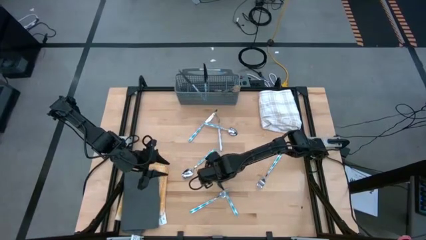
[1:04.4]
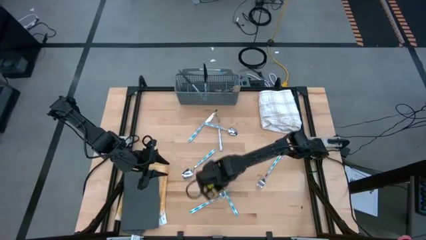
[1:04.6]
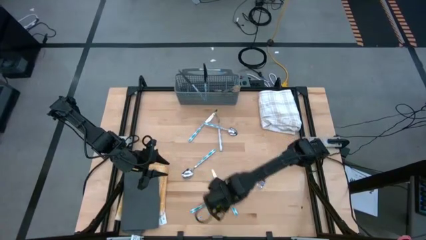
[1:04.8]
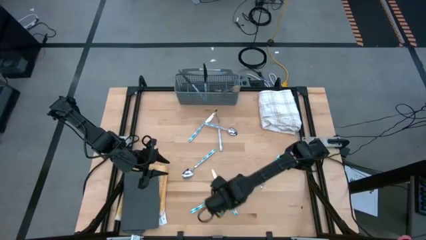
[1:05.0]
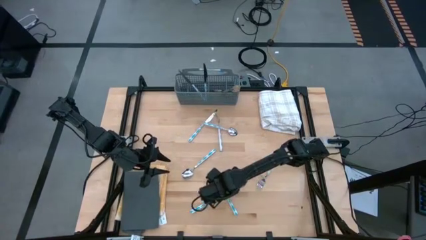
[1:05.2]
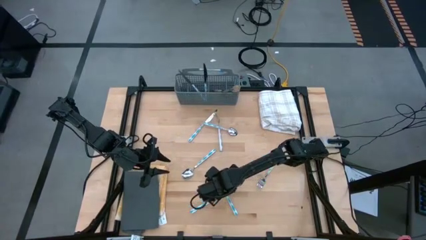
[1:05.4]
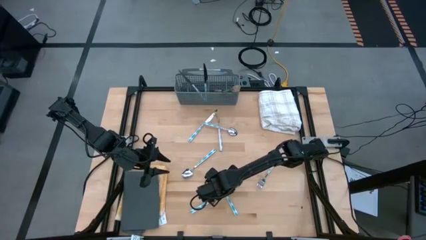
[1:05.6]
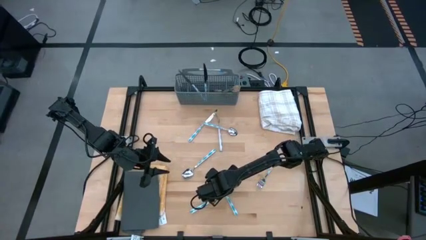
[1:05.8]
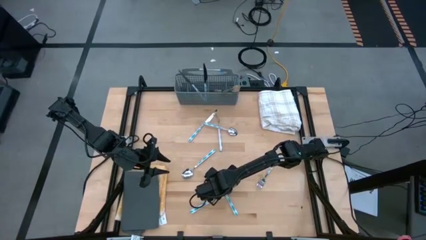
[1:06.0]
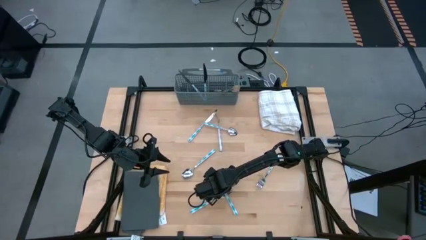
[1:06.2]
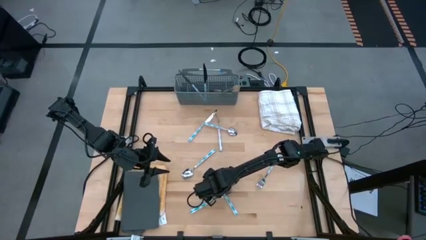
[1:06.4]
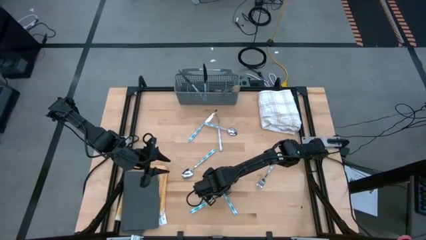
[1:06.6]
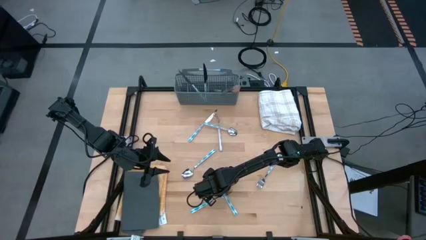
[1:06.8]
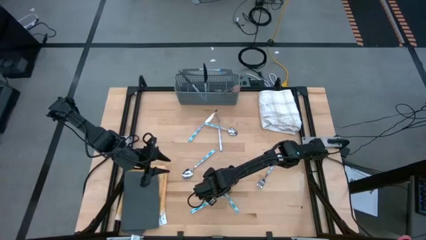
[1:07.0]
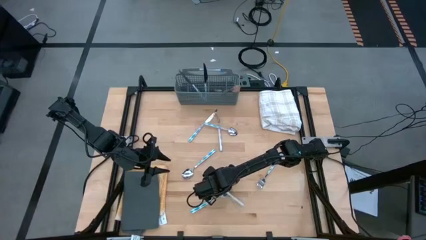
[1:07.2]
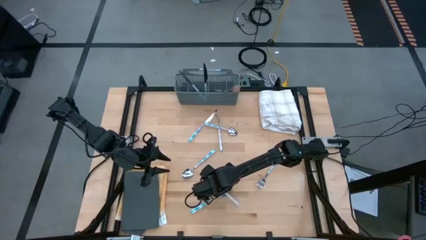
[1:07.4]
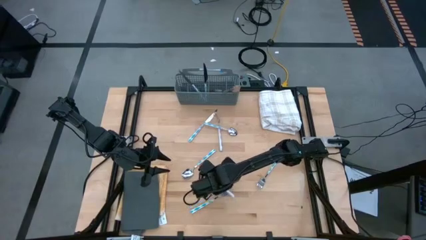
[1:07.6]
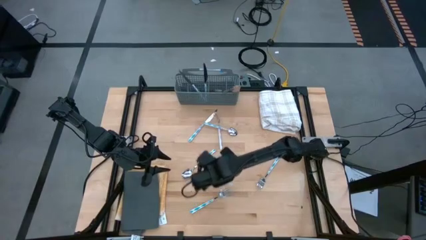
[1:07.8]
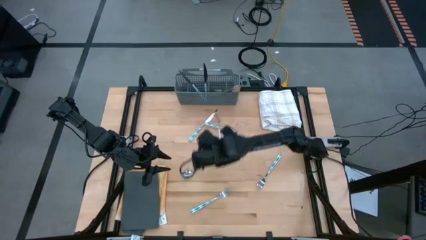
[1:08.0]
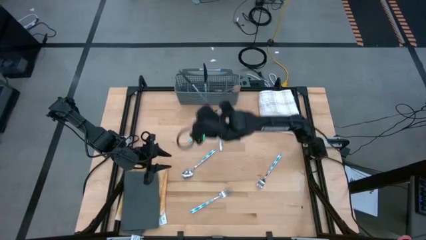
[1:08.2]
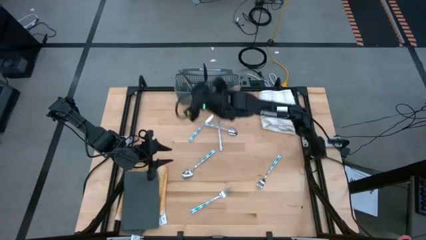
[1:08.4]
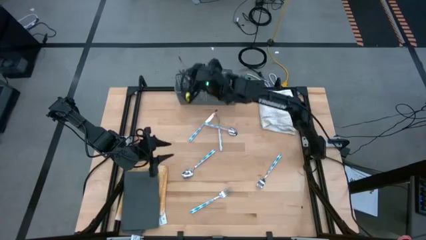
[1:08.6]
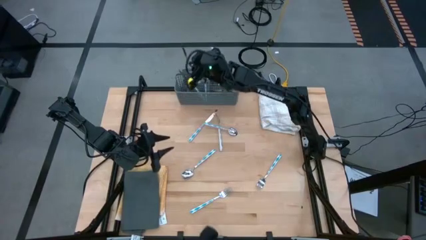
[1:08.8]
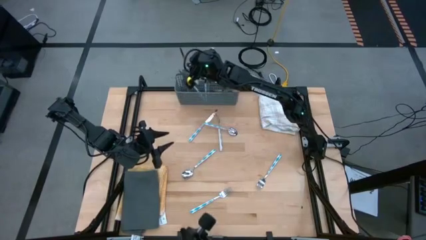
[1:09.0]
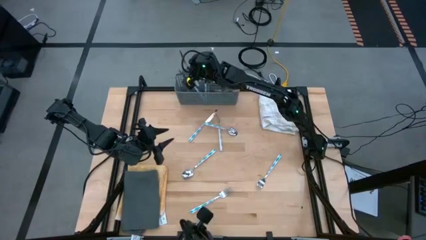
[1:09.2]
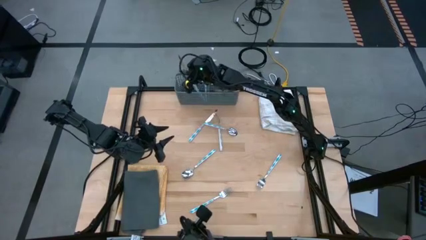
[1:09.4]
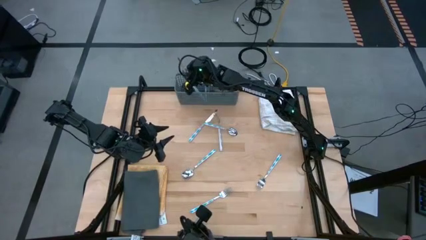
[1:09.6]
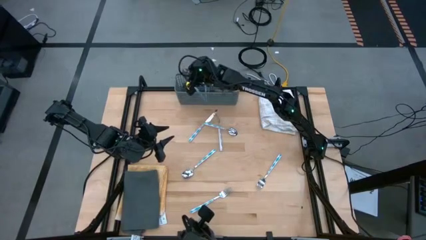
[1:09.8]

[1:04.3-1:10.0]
Task: Sort silverware
Put the blue table knife into the gray silverware rack

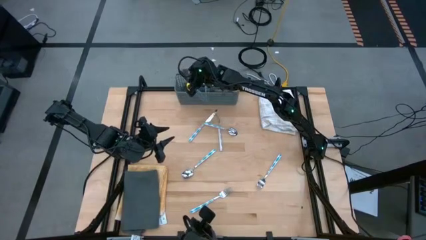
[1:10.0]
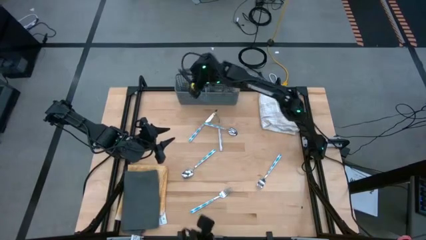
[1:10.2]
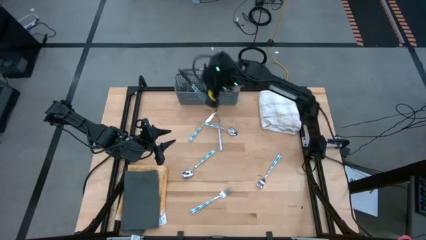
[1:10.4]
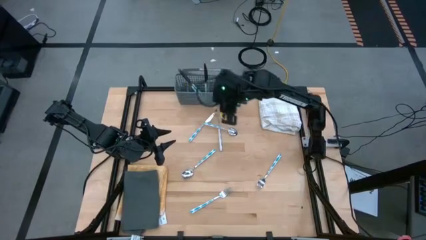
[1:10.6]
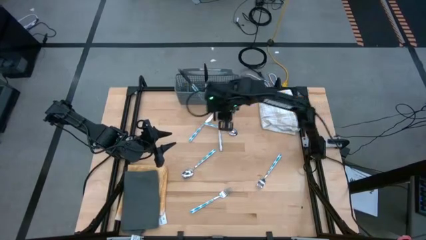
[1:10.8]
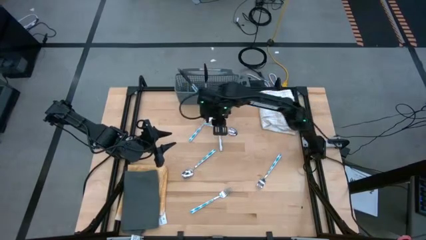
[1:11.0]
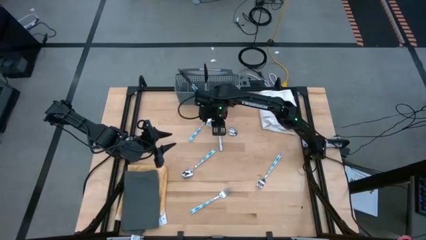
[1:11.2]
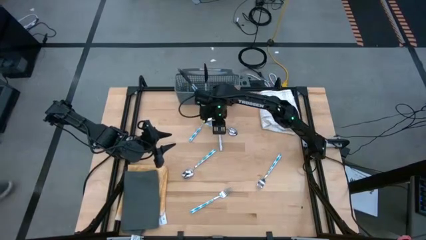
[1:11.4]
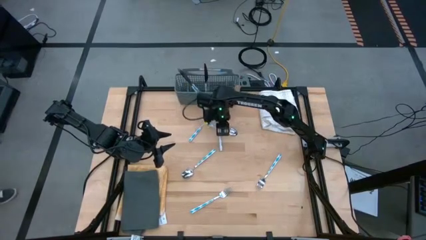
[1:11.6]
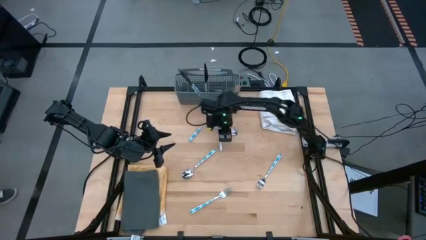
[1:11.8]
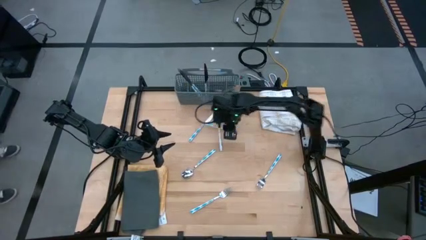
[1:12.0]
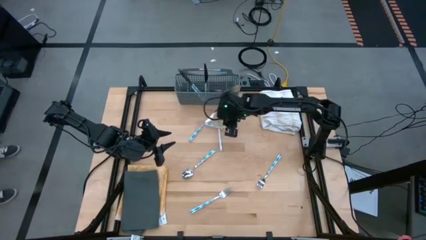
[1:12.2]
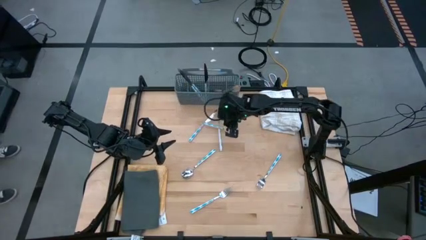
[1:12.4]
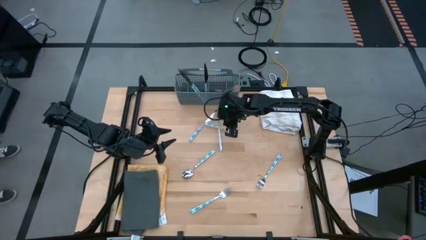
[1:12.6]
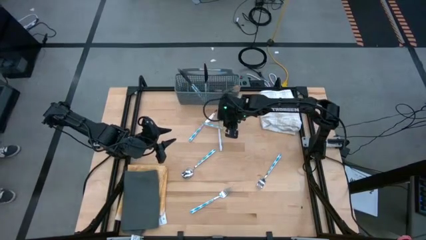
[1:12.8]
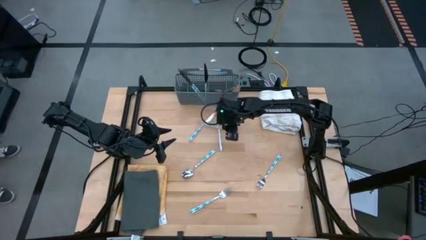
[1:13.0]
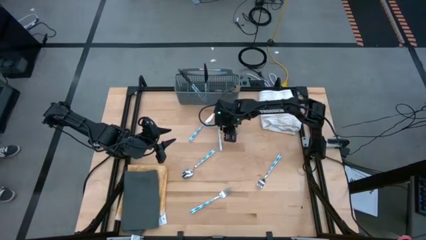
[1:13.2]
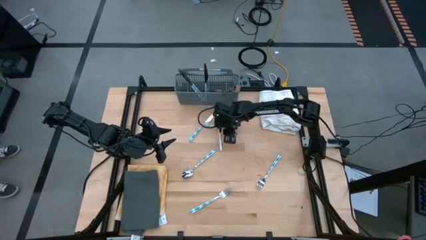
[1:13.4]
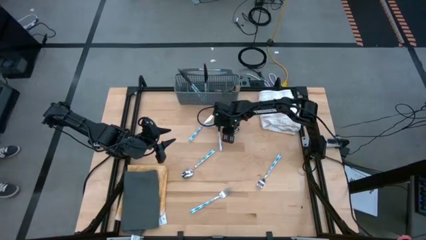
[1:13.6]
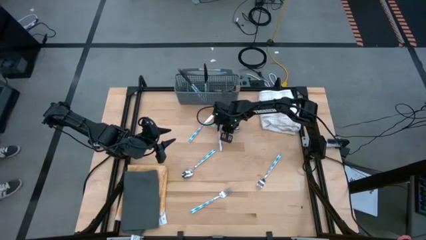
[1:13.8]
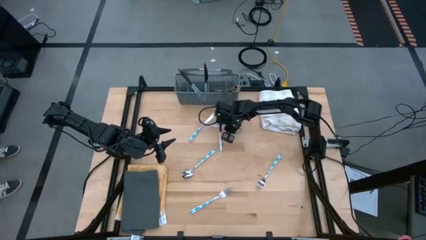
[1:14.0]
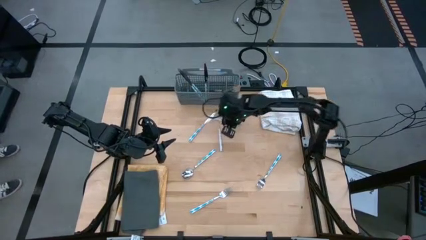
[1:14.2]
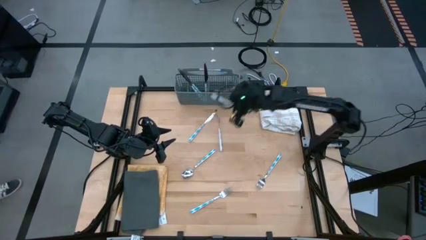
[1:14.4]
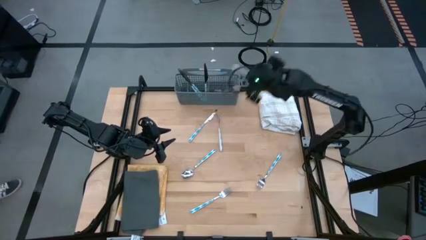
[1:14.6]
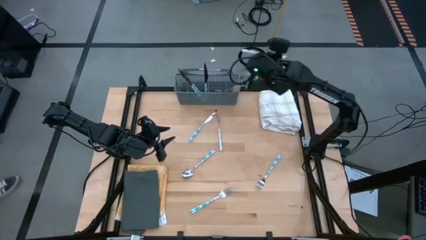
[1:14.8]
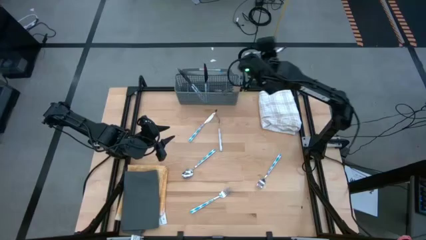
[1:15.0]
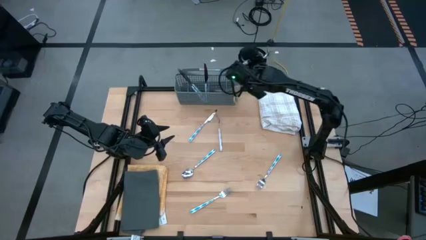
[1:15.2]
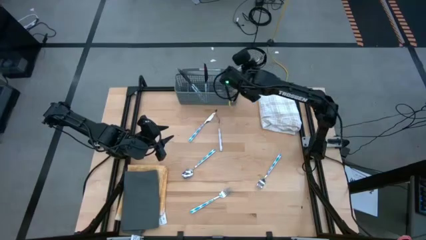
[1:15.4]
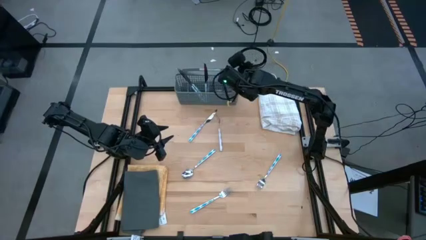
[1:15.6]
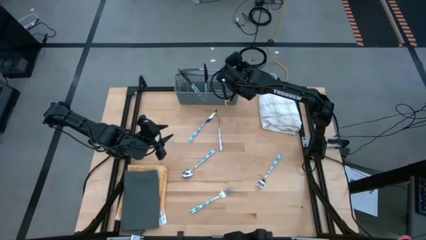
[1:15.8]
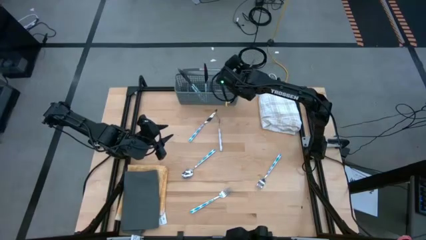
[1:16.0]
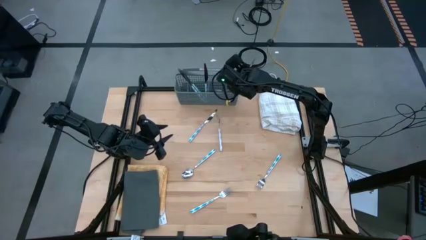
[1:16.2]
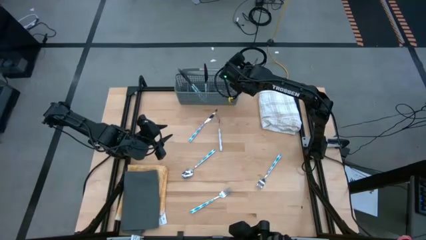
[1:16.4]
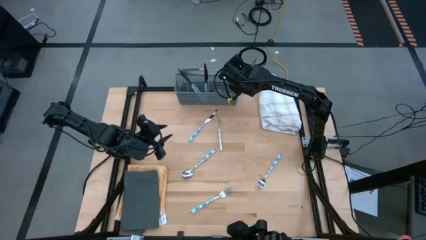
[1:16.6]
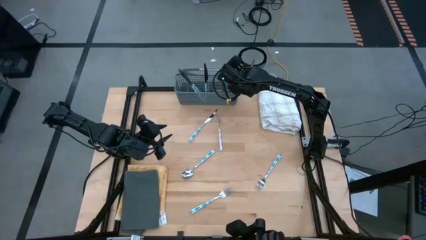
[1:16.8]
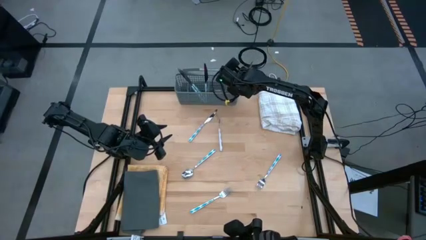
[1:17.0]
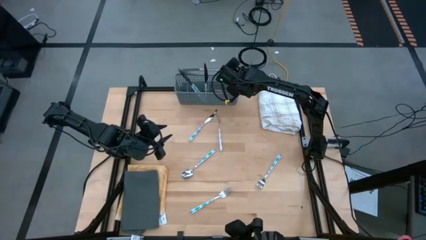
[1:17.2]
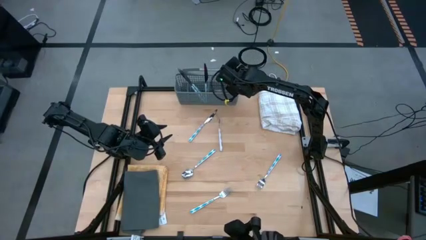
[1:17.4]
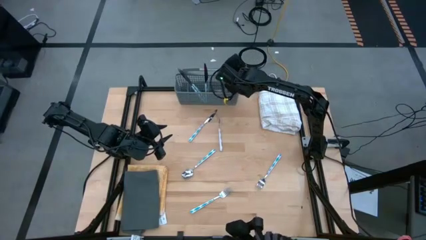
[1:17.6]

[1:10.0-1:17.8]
Put the blue spoon into the gray silverware rack

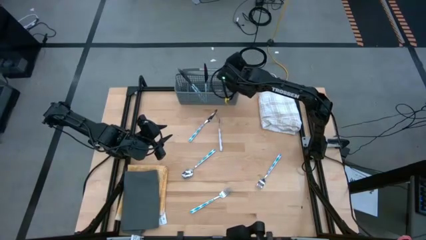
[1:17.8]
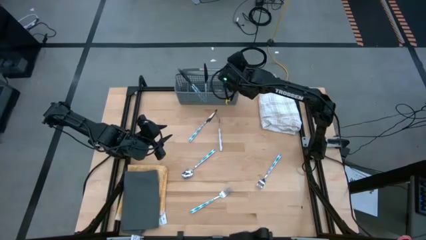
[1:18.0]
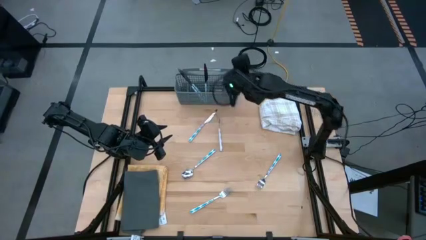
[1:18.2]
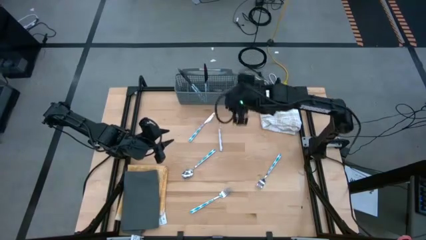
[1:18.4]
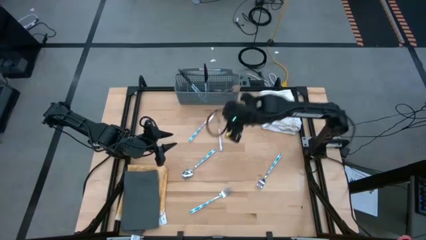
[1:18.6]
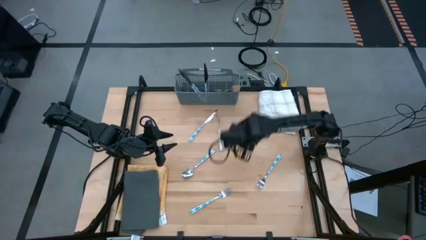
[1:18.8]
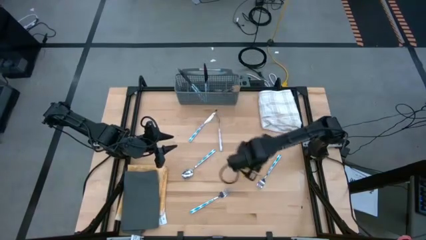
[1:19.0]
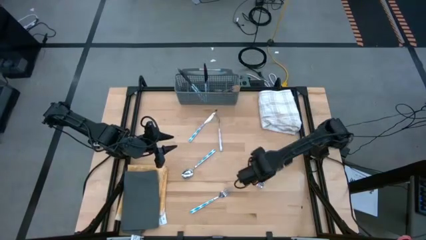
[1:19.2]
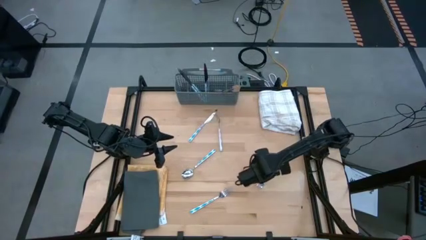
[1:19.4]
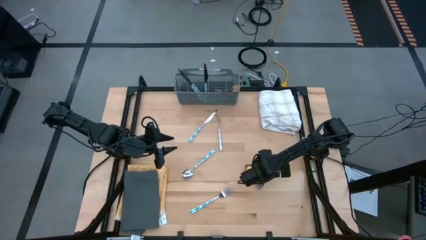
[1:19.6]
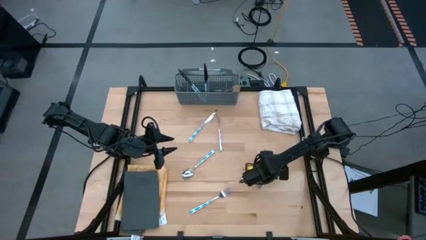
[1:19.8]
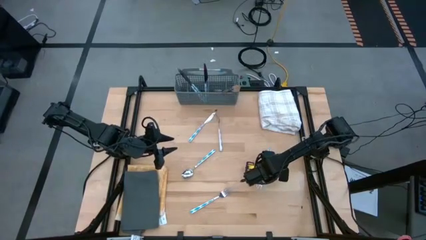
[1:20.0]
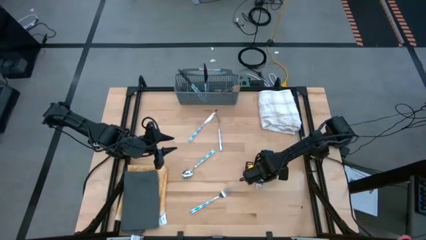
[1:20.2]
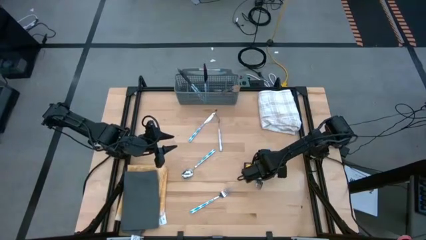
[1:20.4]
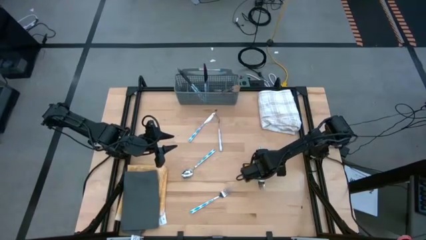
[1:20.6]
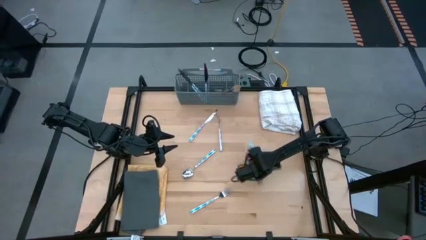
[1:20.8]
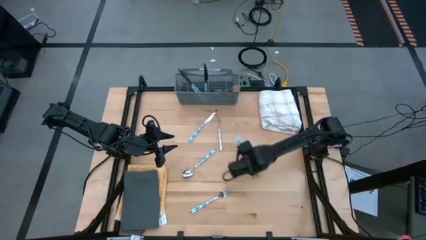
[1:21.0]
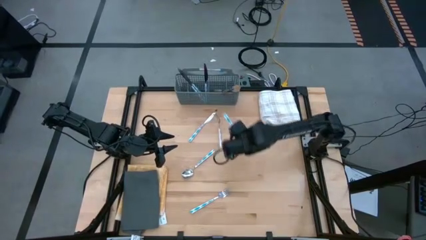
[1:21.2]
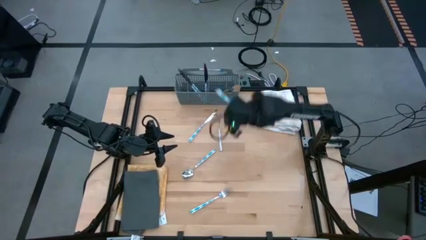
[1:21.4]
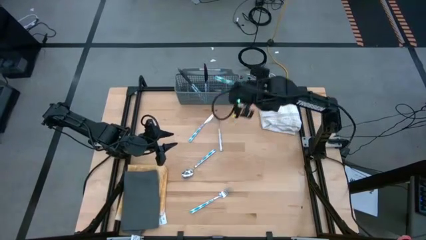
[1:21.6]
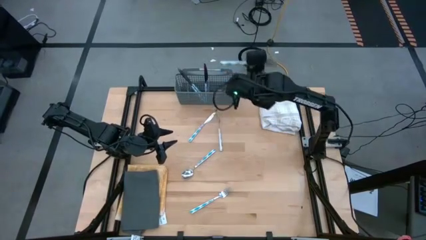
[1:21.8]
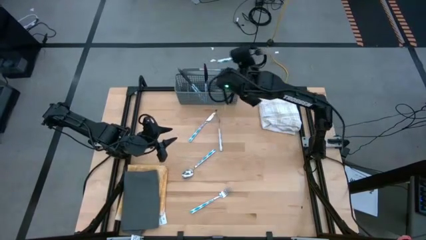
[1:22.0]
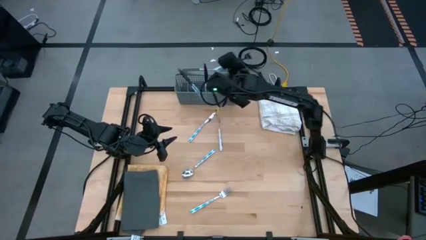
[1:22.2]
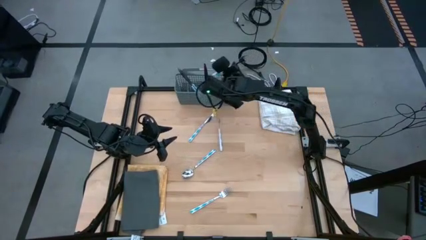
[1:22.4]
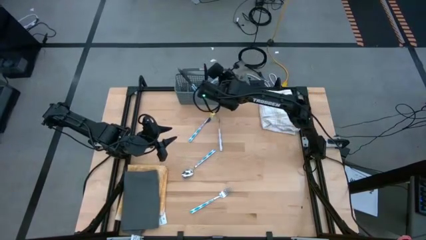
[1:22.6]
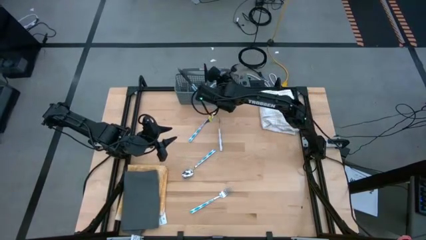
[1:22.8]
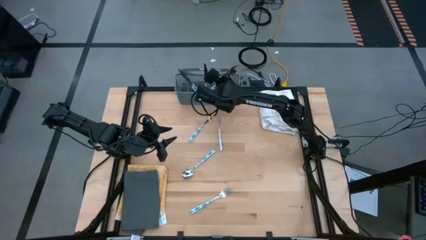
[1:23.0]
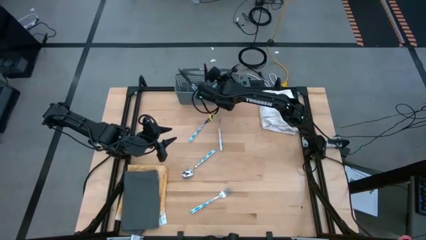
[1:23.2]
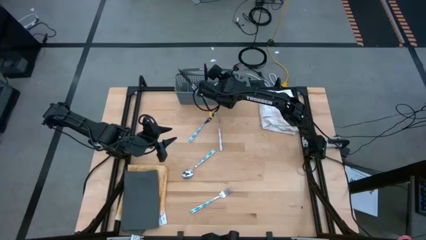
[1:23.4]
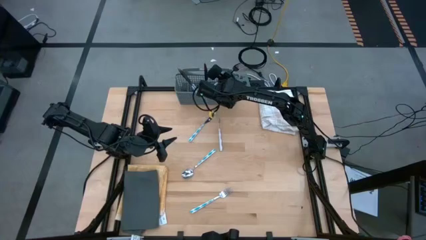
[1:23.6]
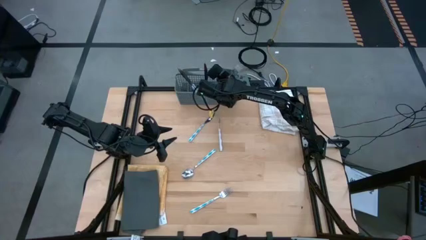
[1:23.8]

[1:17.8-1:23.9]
Put the blue fork into the gray silverware rack
